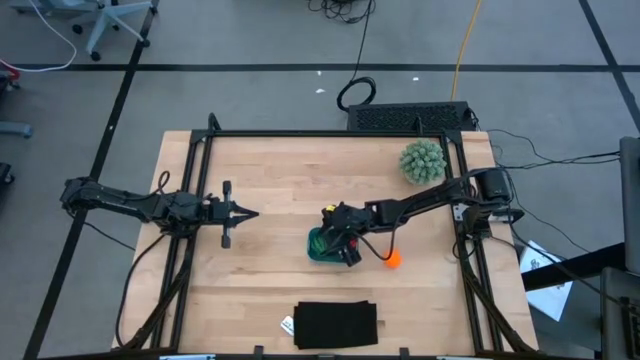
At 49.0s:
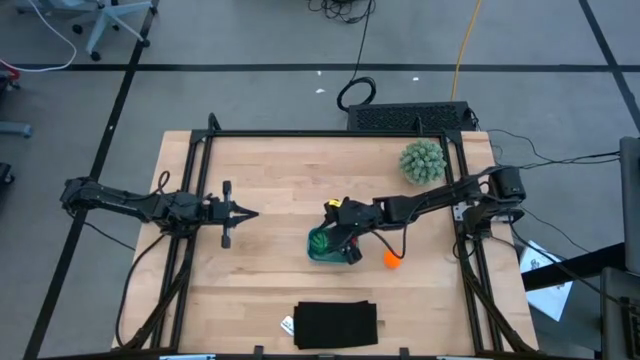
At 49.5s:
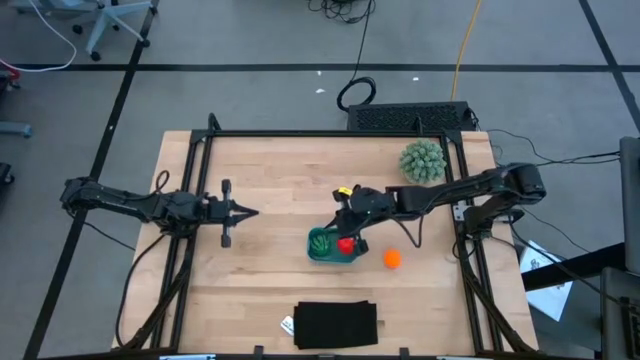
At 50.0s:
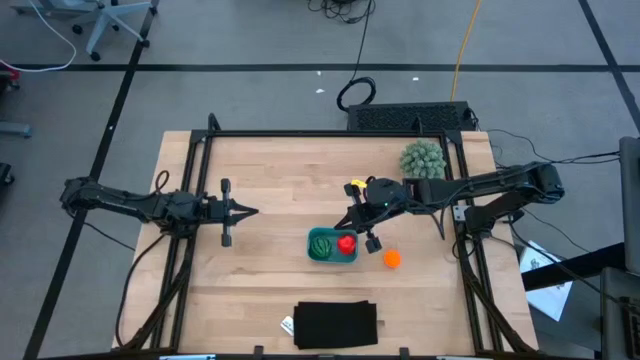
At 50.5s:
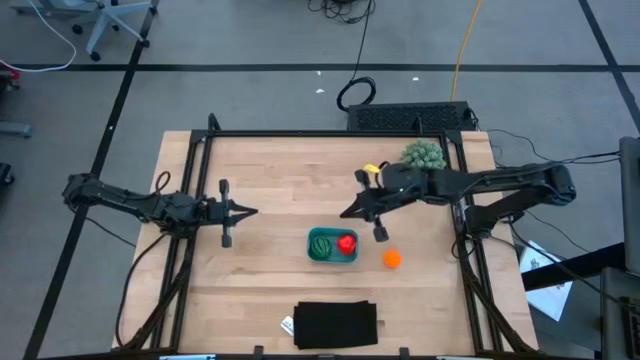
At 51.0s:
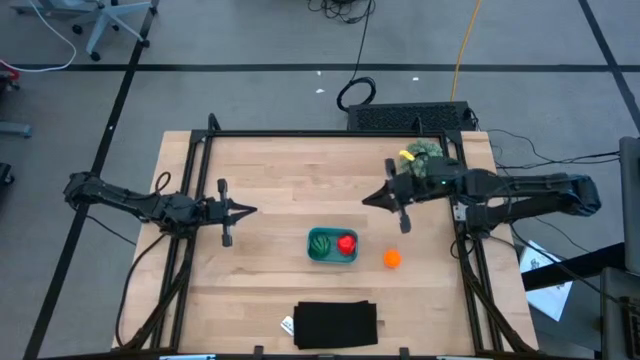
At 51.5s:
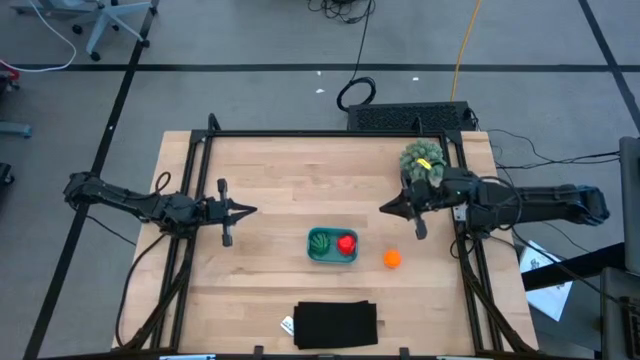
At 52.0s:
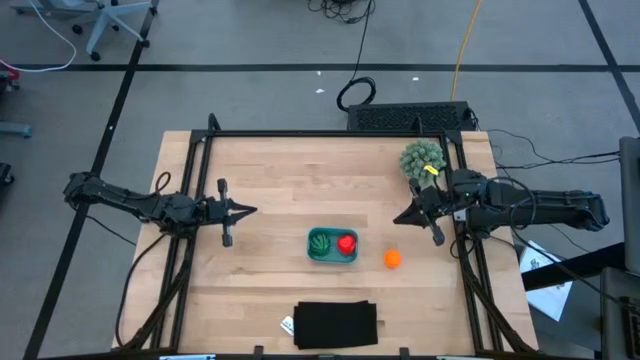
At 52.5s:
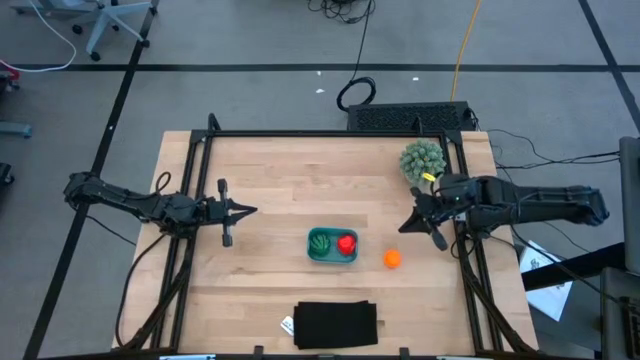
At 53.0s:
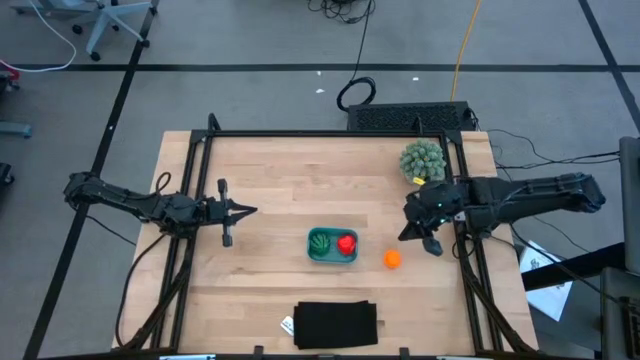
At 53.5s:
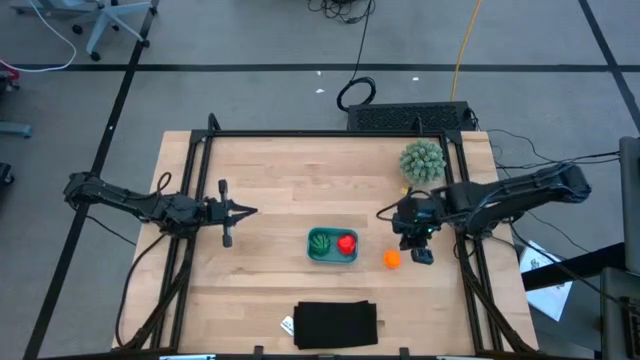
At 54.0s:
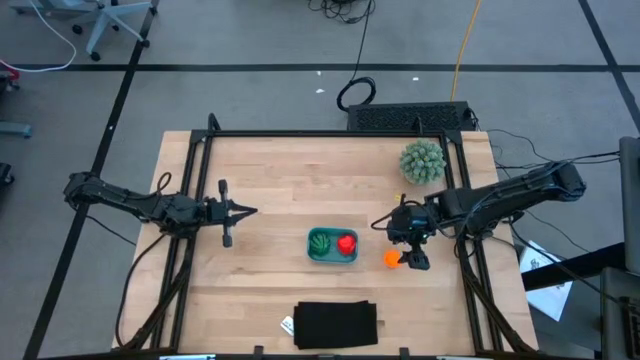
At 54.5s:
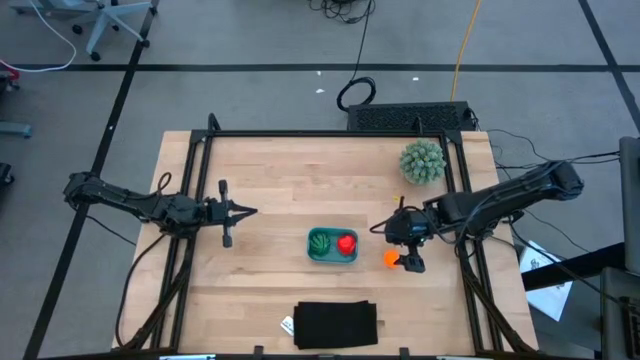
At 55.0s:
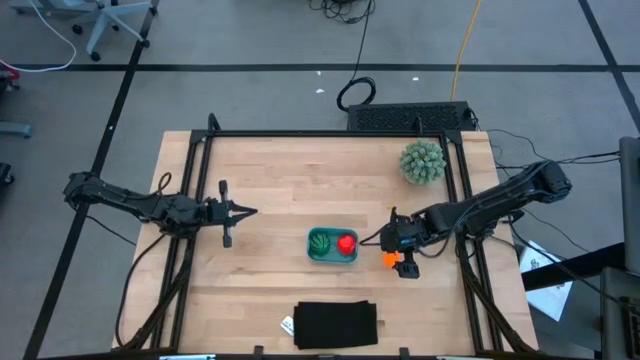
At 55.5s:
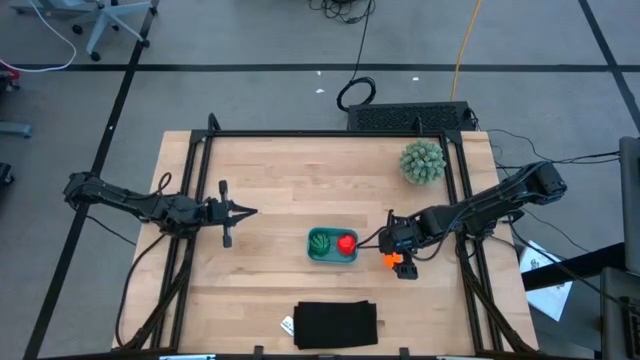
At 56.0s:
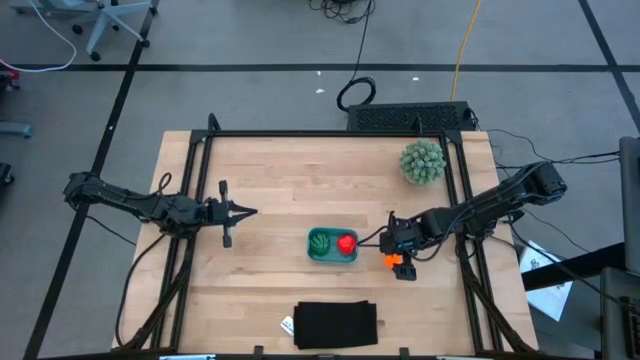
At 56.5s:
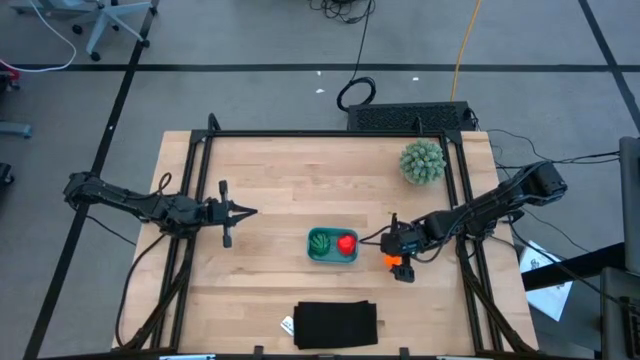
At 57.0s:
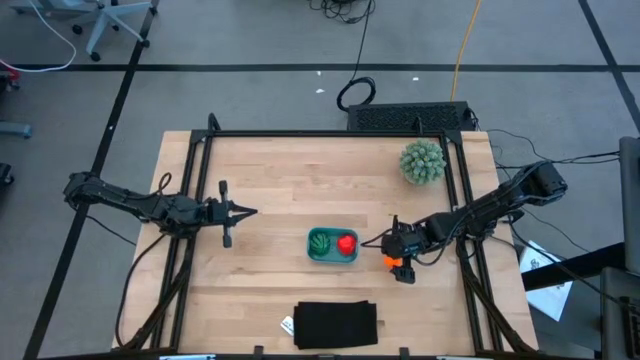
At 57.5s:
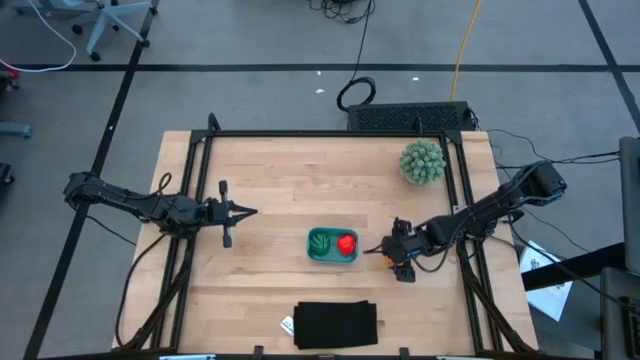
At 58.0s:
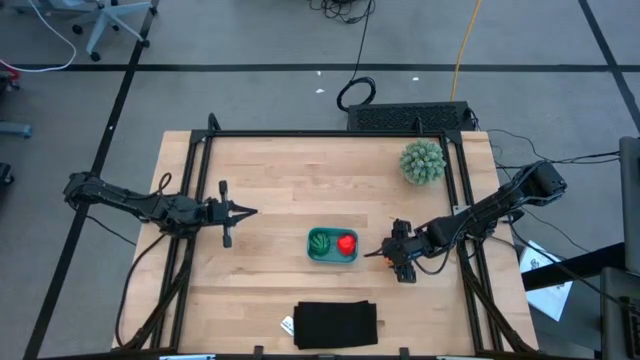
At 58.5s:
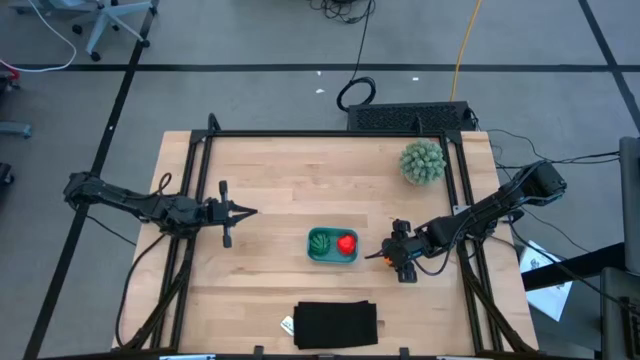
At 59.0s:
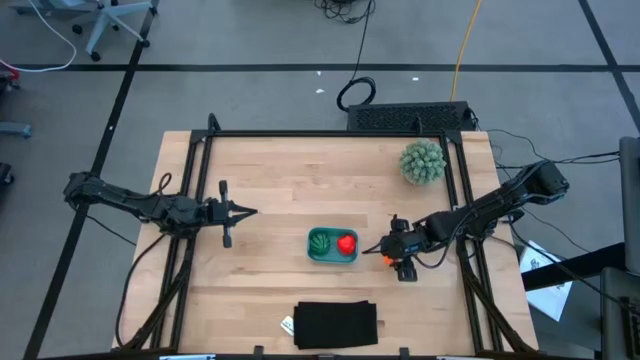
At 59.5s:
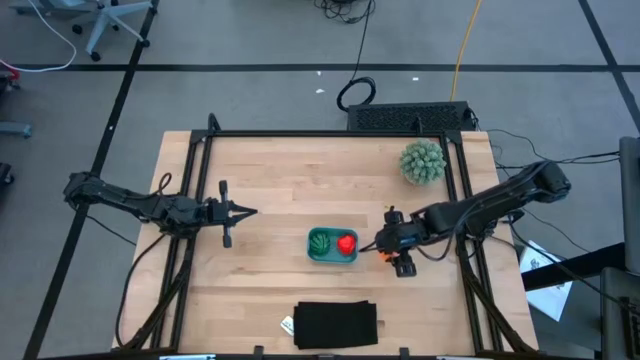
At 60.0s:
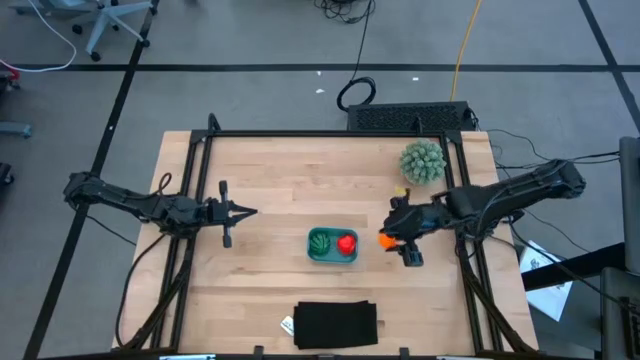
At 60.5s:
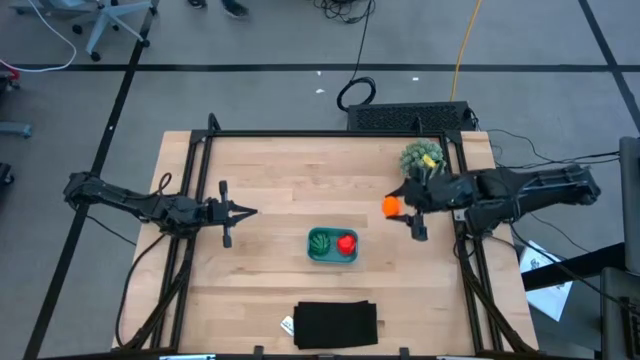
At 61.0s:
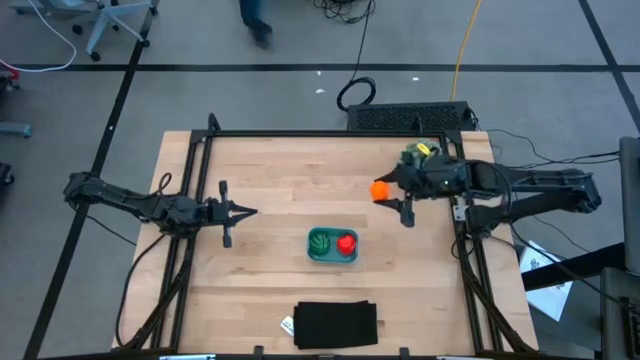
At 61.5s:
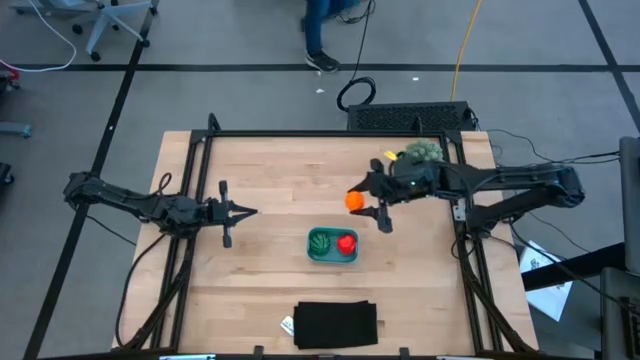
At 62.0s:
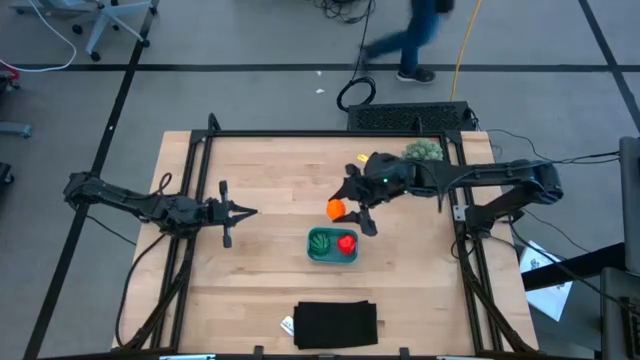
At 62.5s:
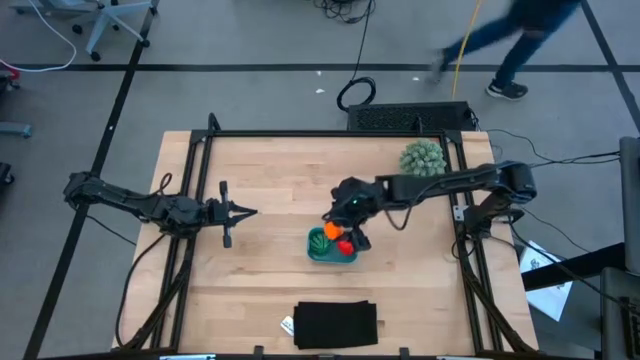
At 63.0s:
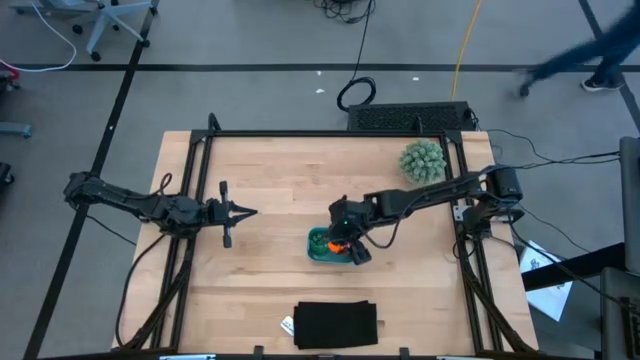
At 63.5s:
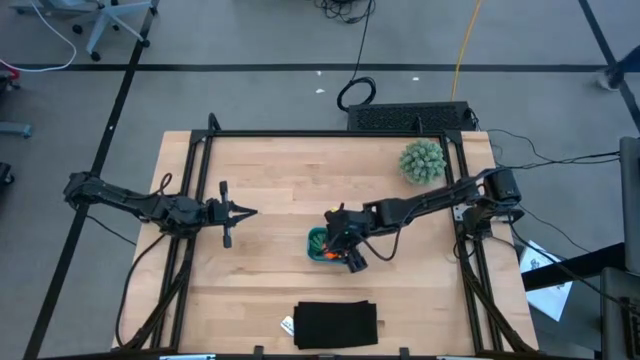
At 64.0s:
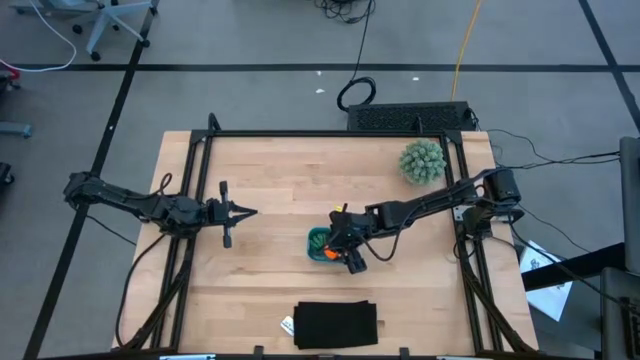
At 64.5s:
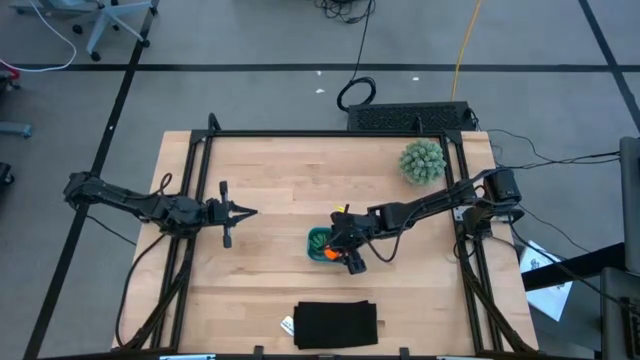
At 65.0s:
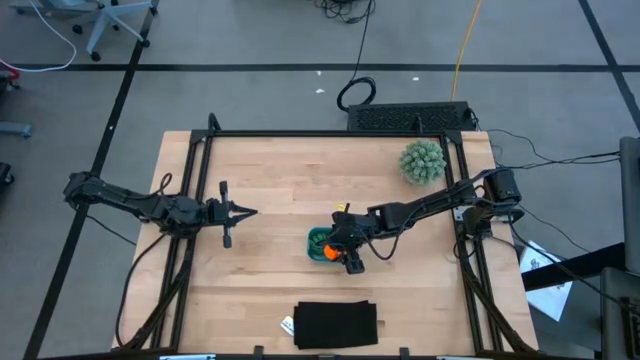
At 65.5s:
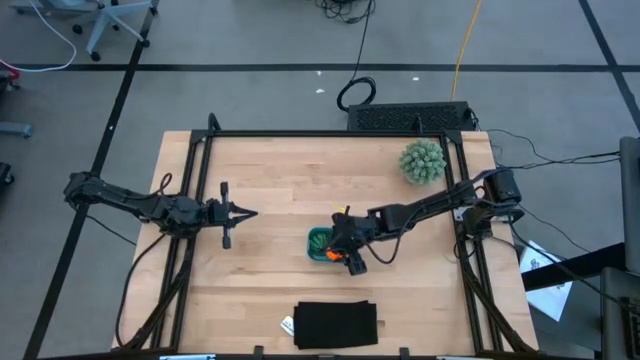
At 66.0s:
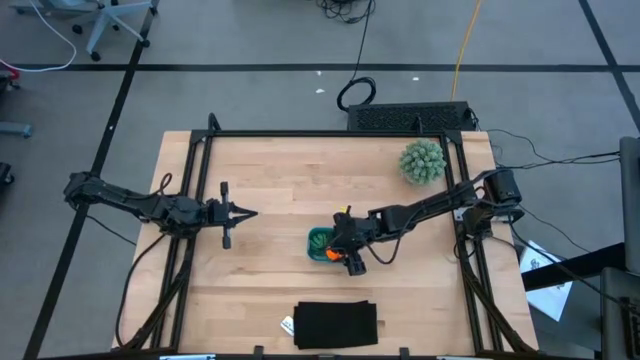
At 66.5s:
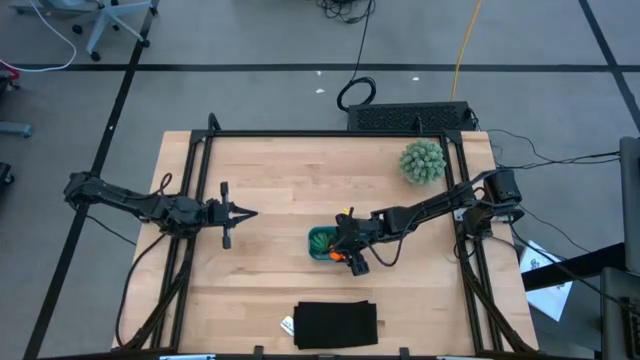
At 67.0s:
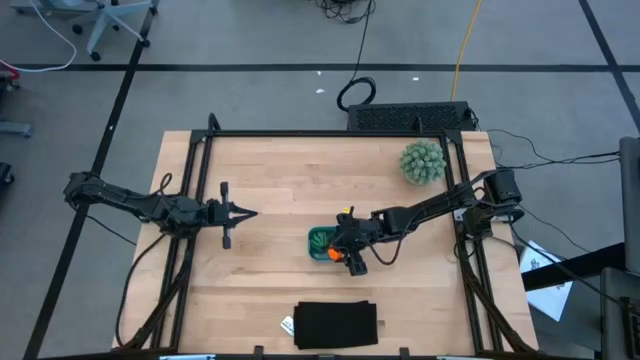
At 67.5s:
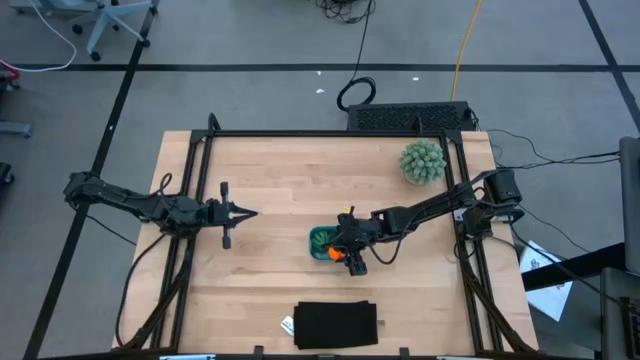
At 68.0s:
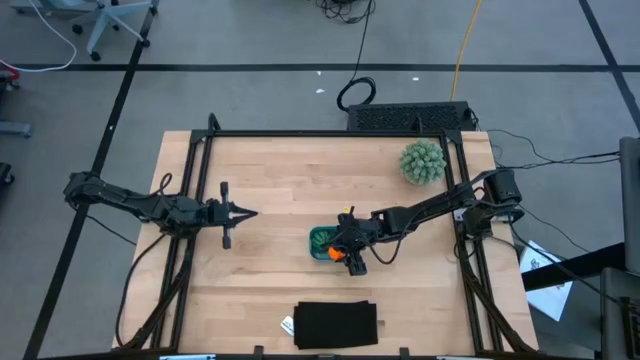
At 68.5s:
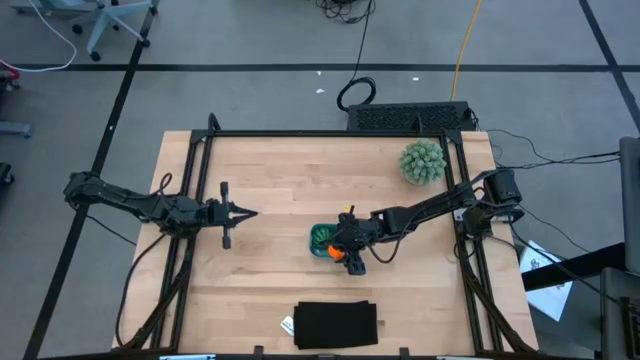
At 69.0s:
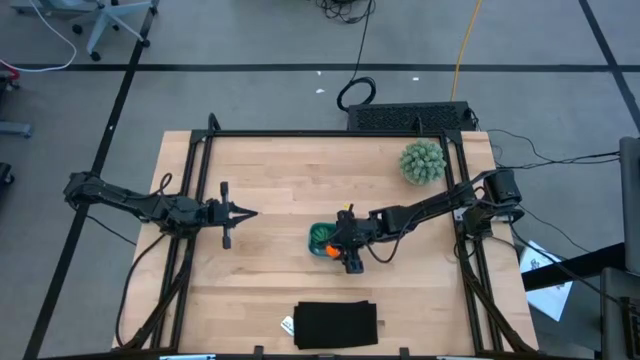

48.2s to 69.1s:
Task: Pick and placing Produce into tupperware
Put the orange pumpkin into the blue bin

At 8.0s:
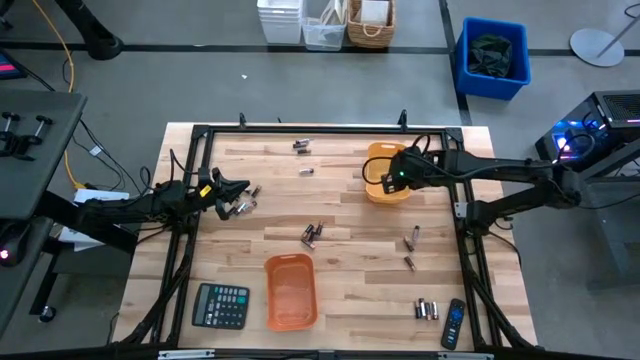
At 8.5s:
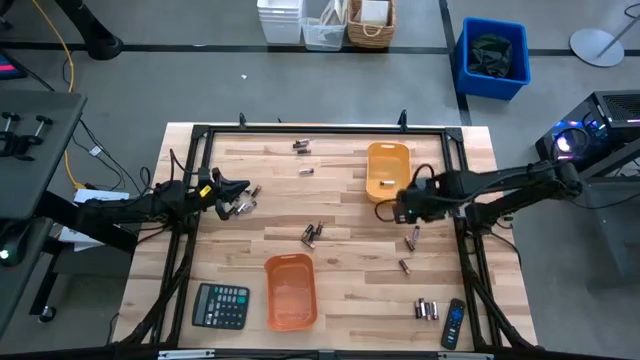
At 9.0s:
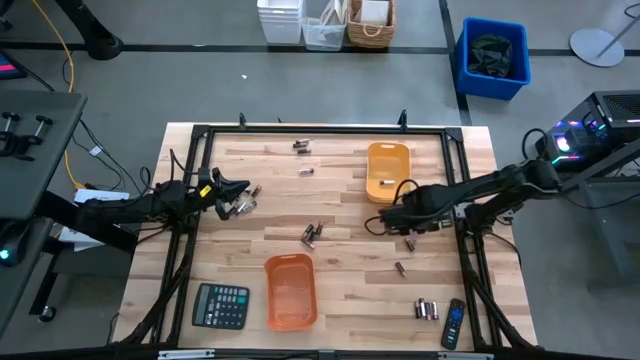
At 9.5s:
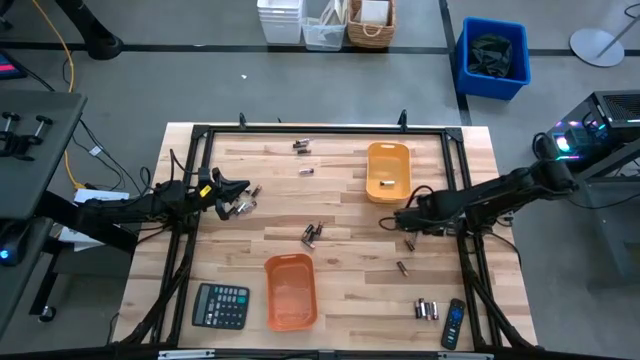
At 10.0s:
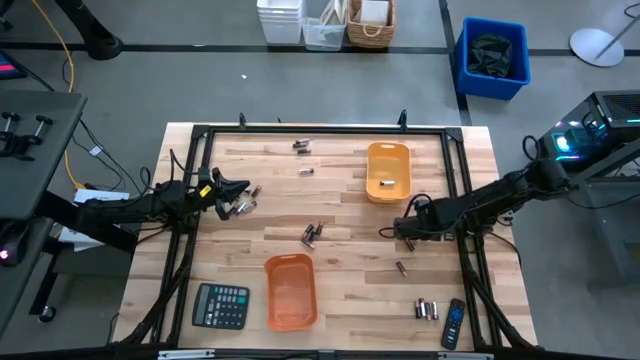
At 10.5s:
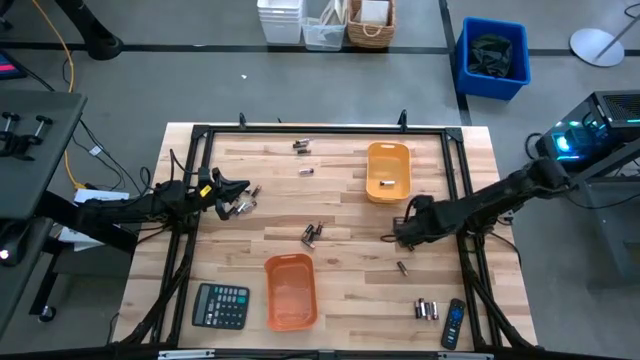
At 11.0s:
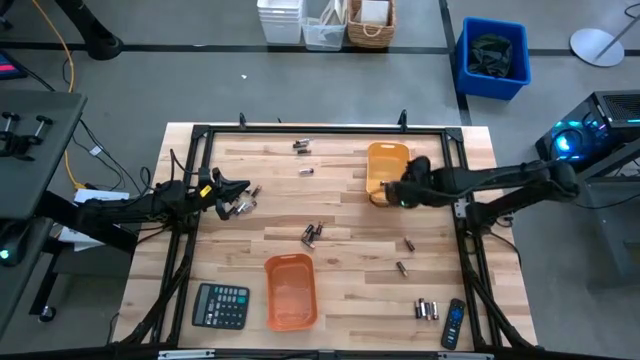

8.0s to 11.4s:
Task: Sort batteries
Put the silver battery into the yellow bin
